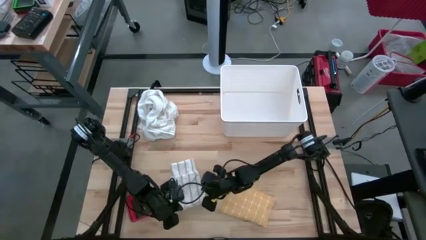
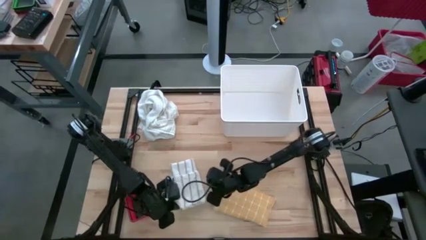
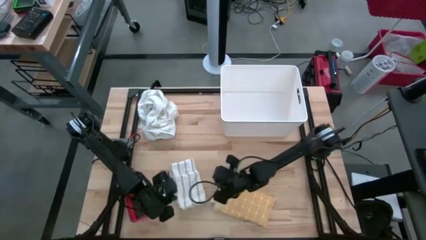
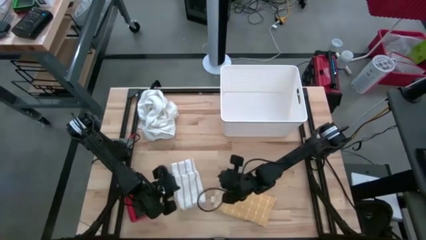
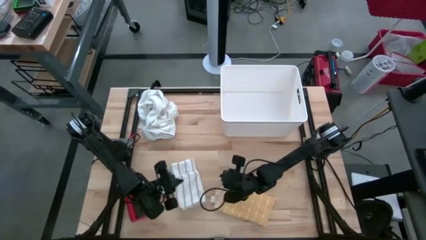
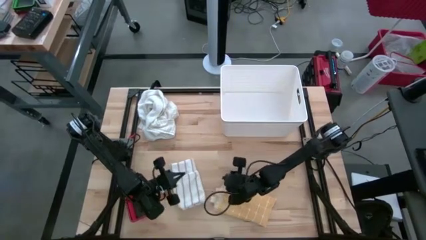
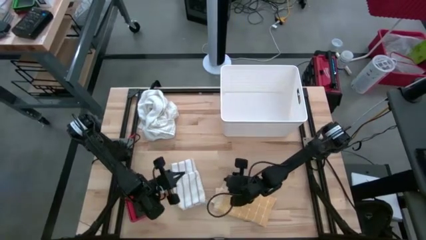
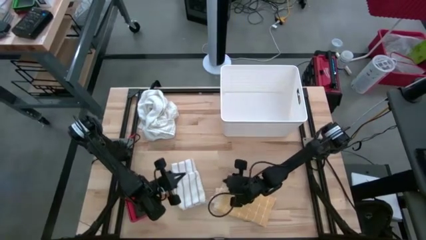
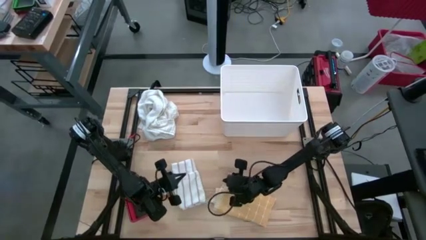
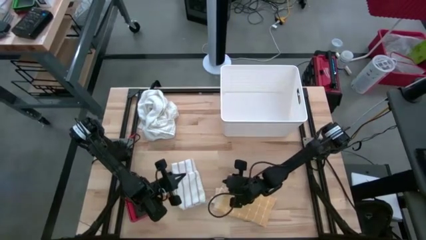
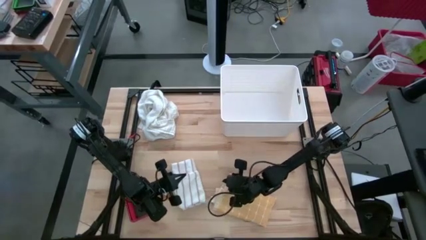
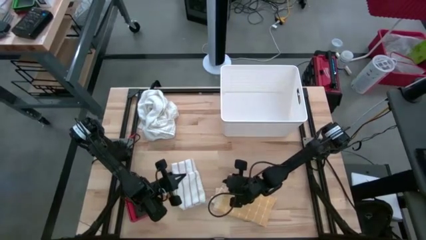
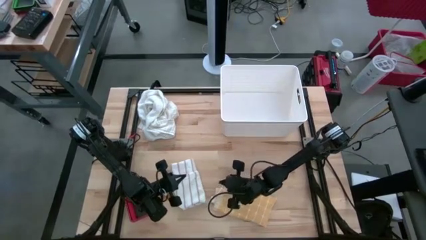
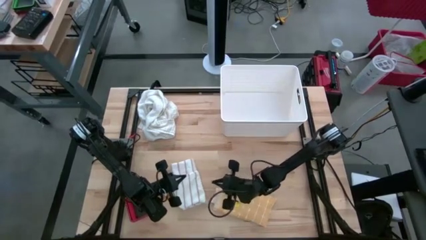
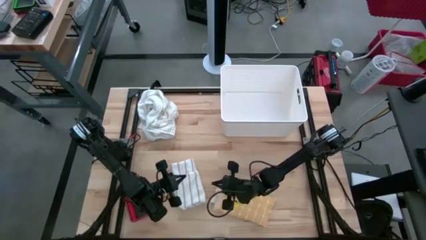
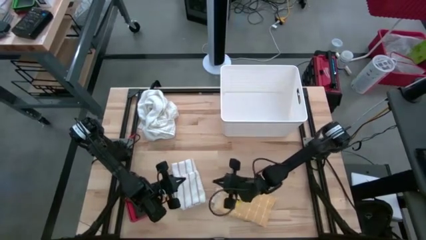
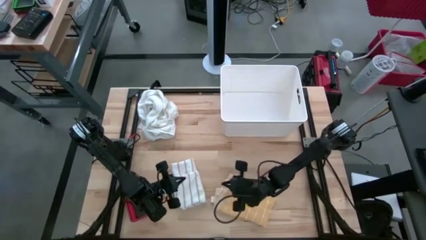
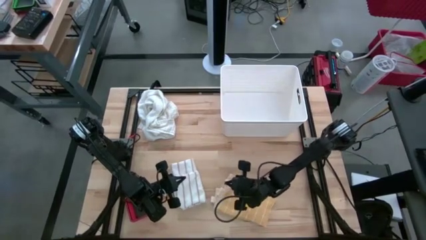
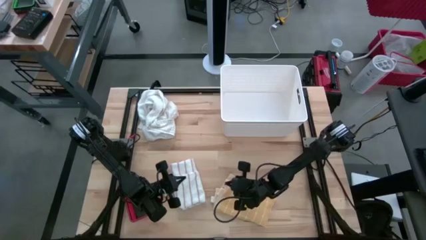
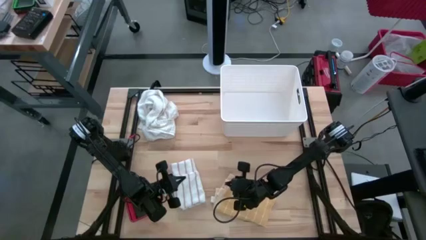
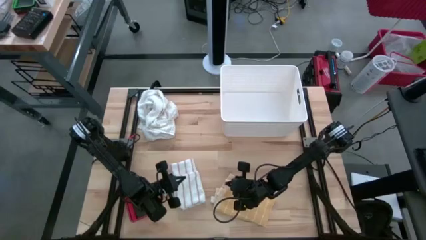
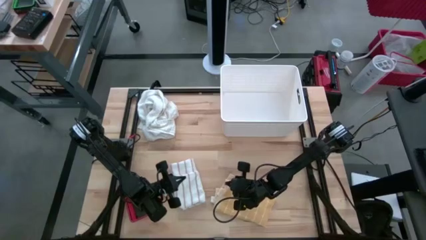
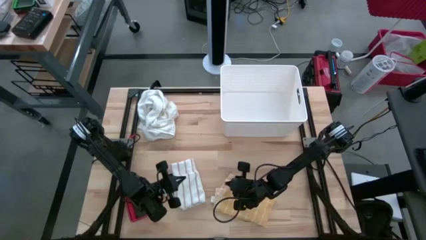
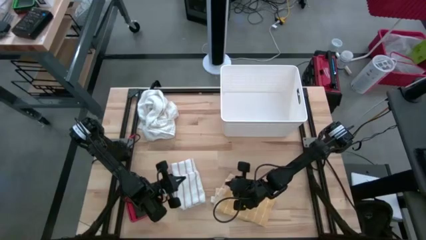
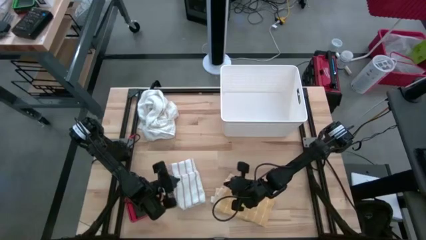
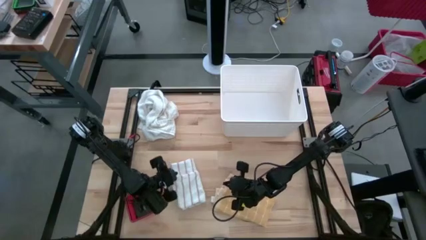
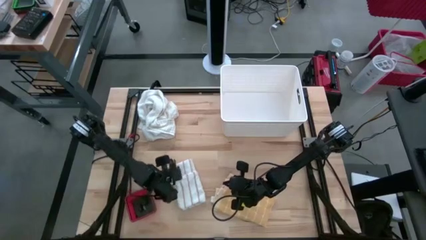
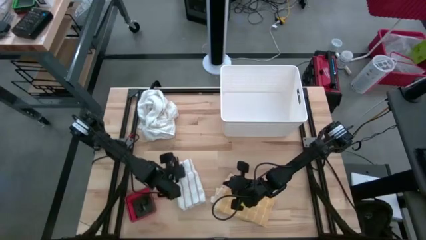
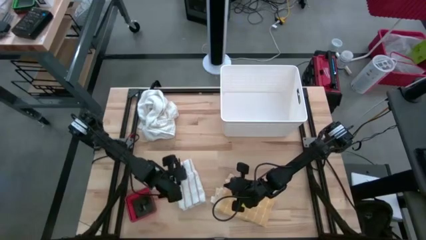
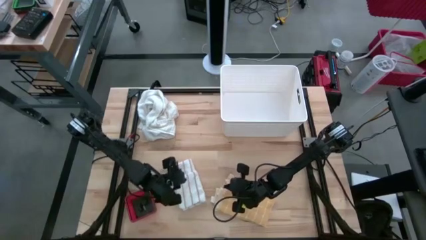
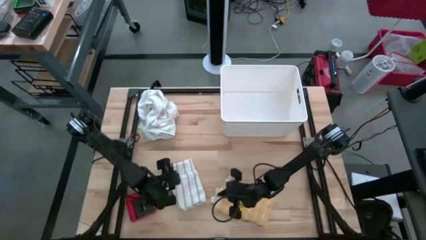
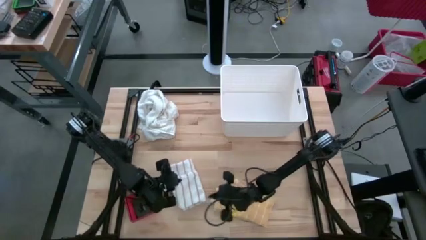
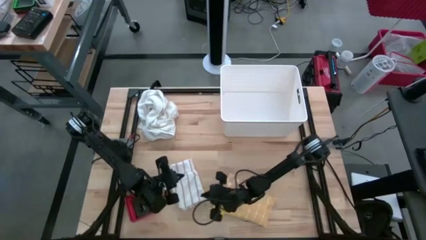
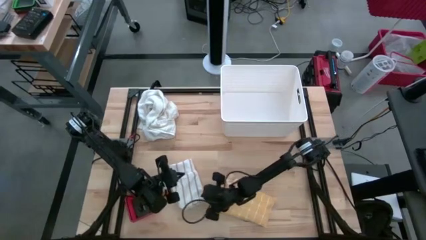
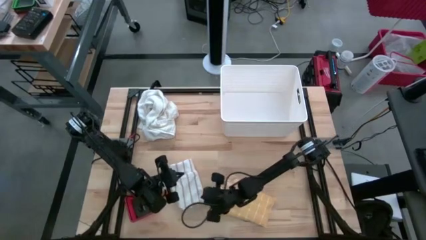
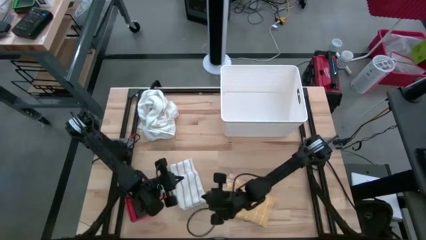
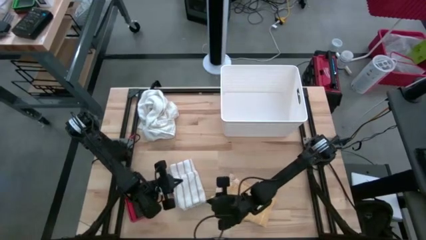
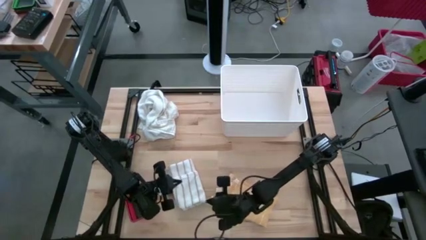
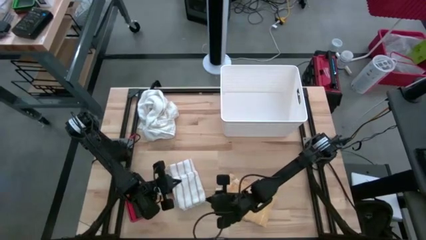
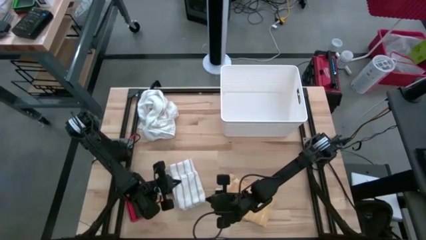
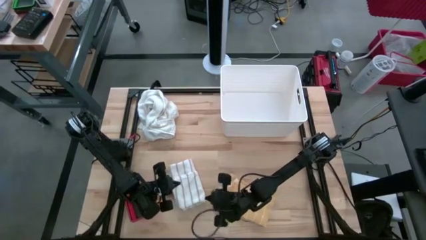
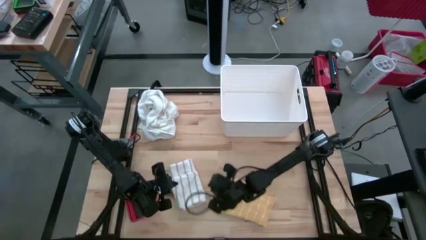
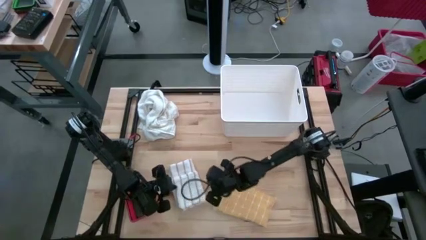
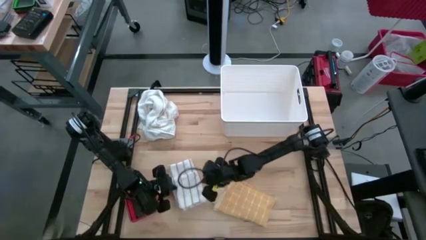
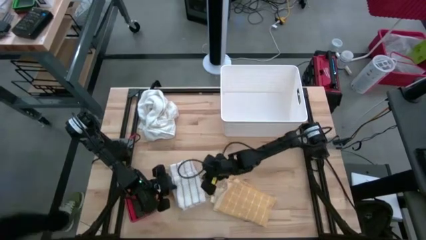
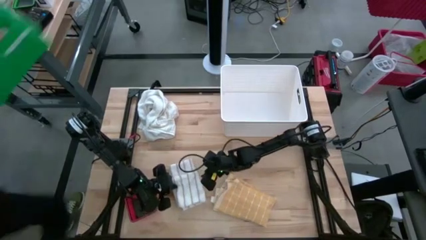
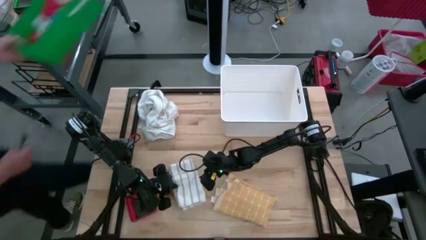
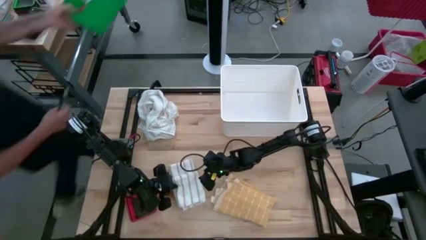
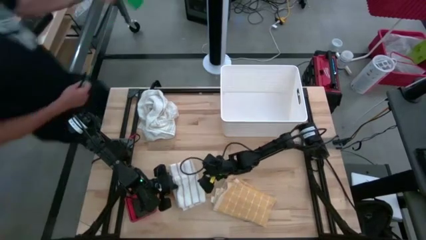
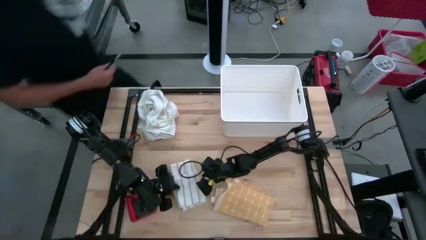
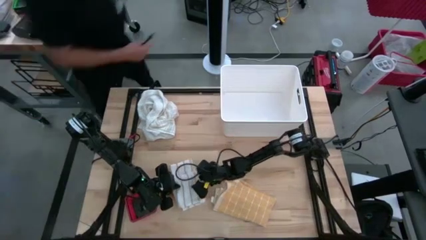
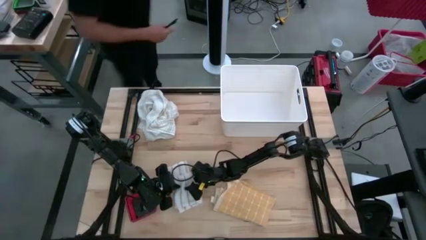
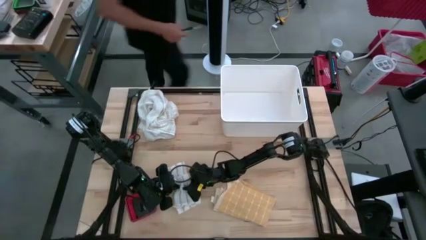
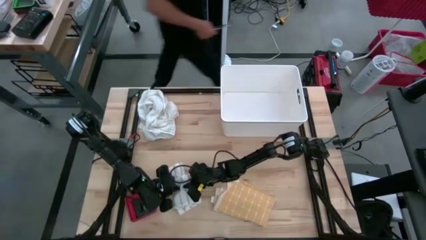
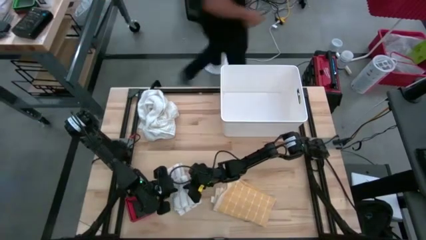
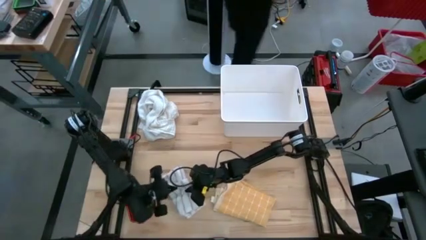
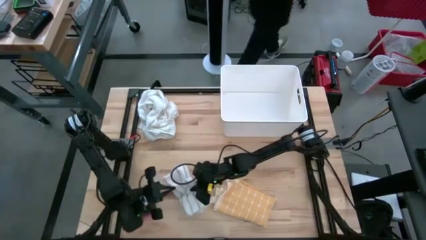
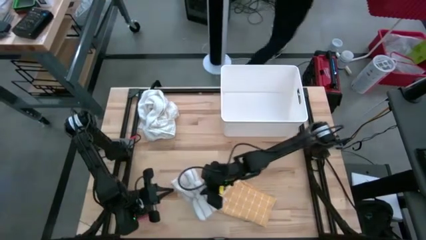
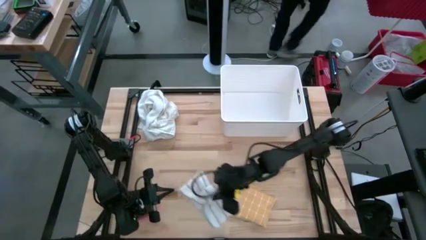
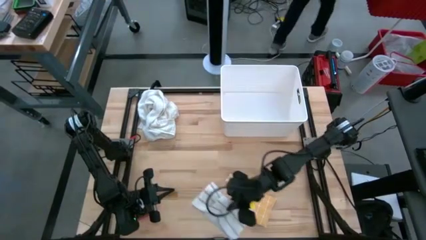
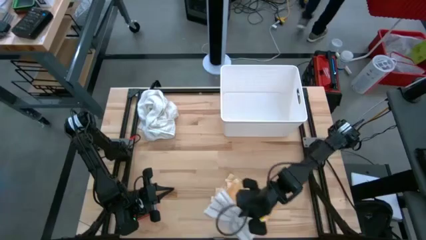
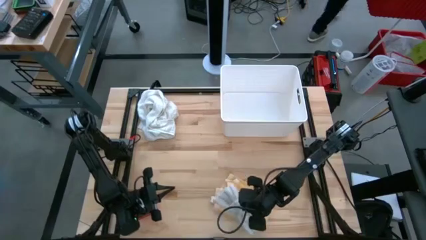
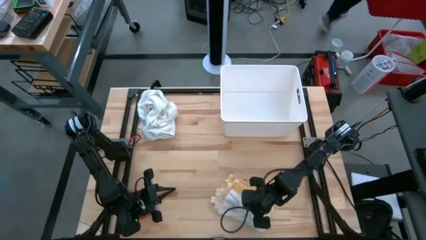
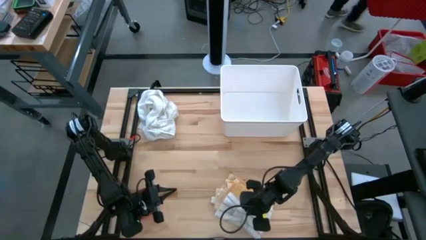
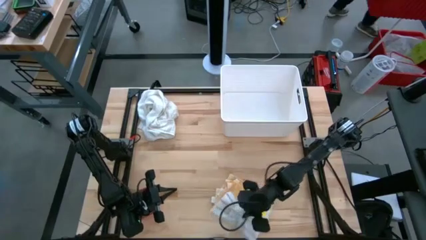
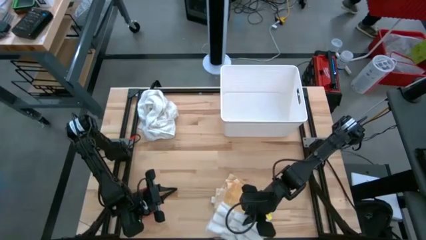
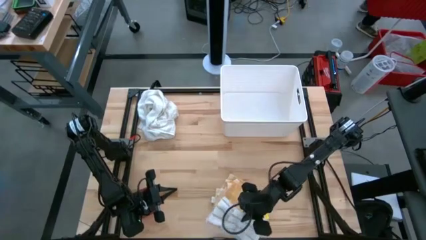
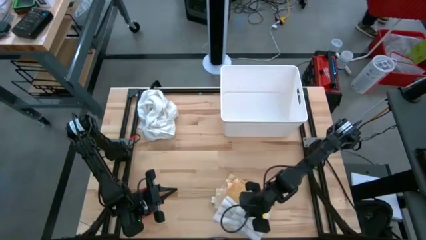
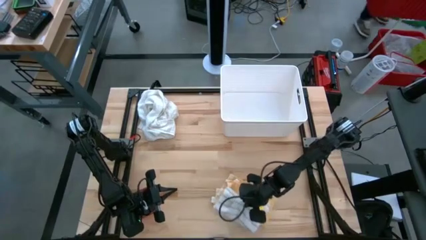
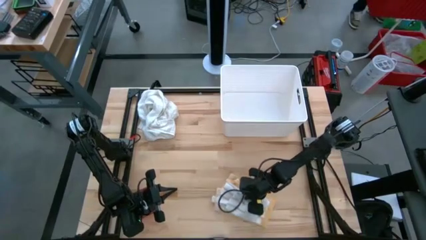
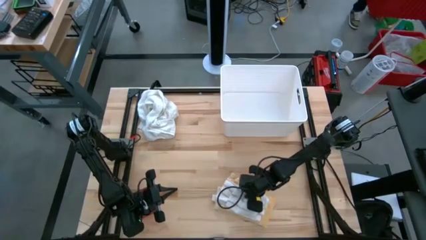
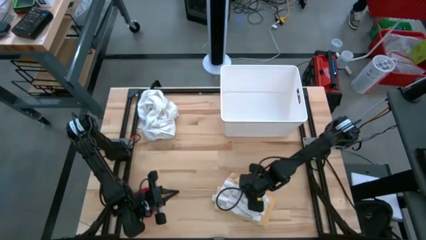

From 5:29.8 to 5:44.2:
Task: Fold towel
Stack the white kitchen towel on top of the yellow kitchen towel

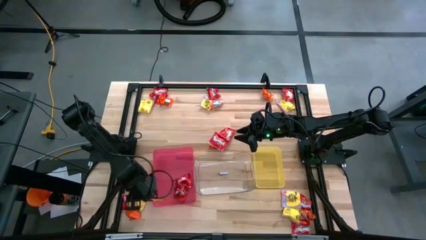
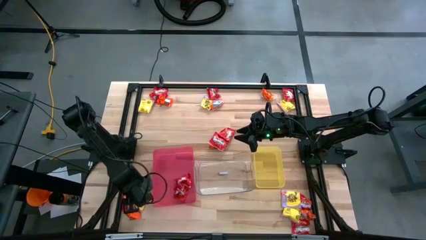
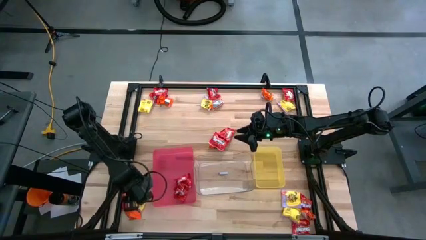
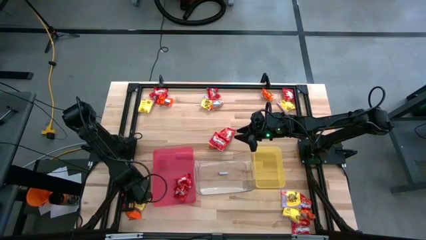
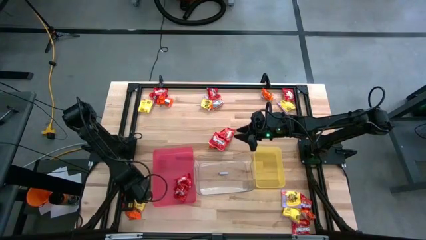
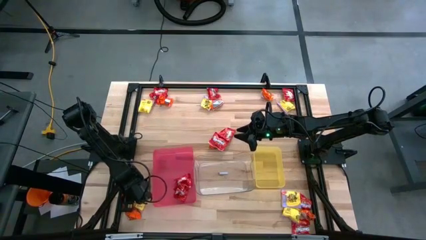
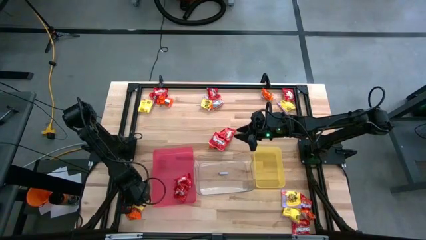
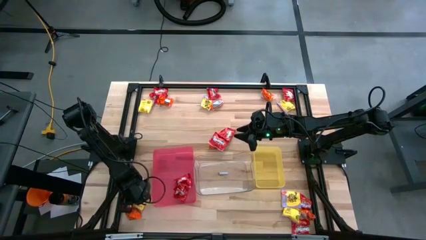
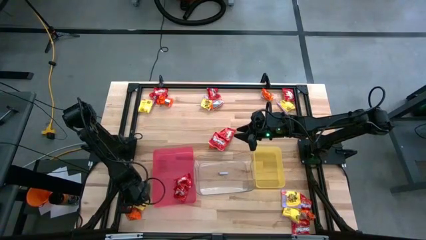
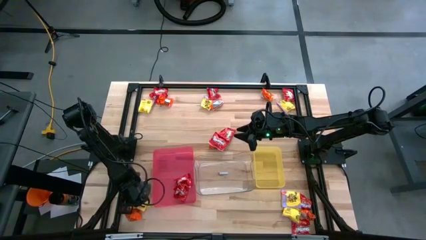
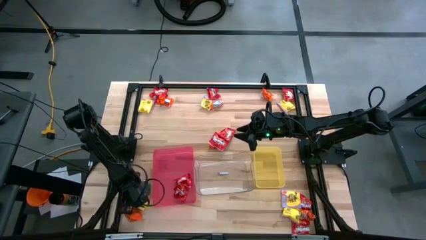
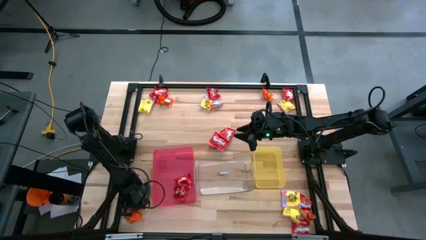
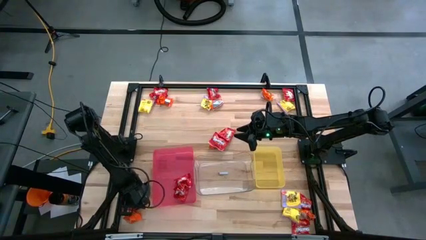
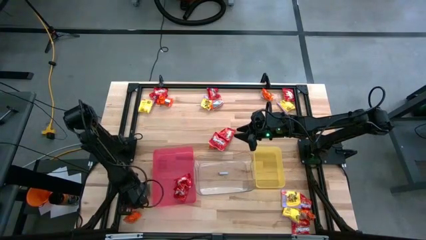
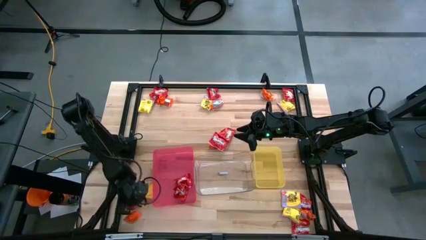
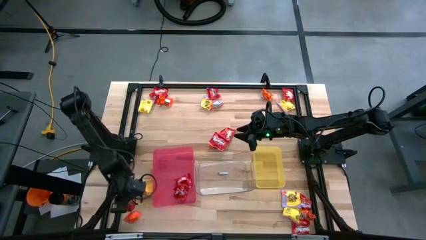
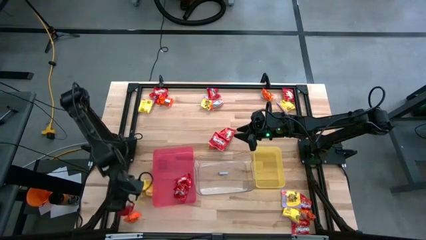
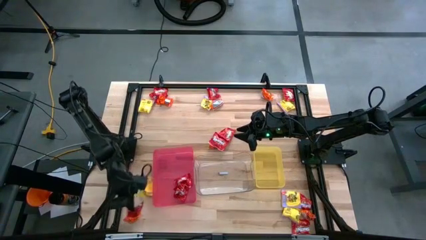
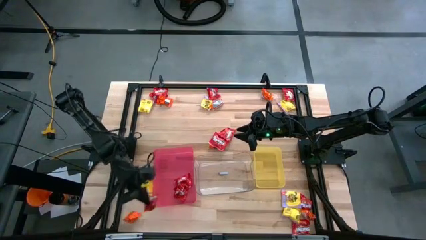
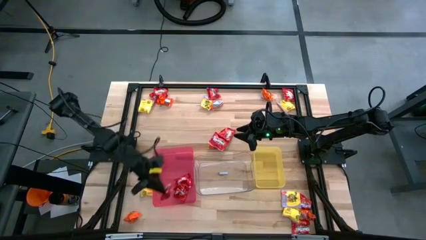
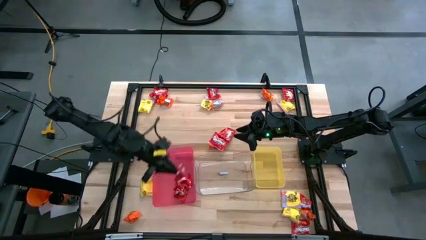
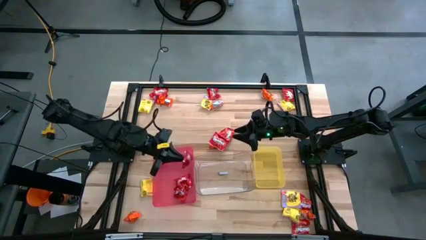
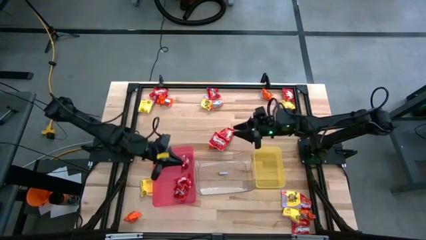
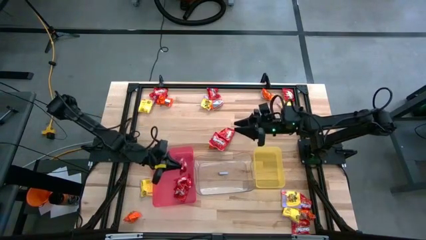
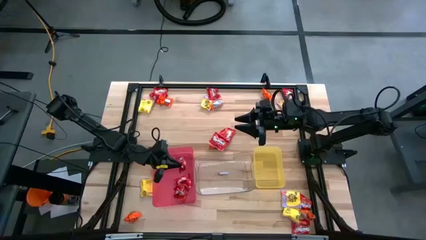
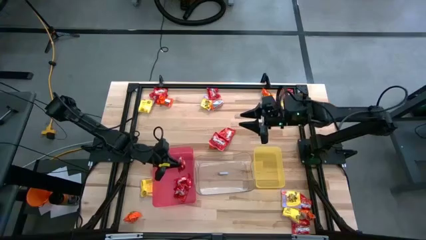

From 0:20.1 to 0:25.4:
Task: Sort candy
Put the red candy into the red bin
